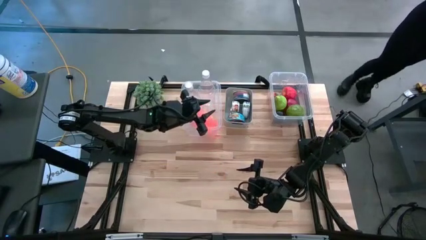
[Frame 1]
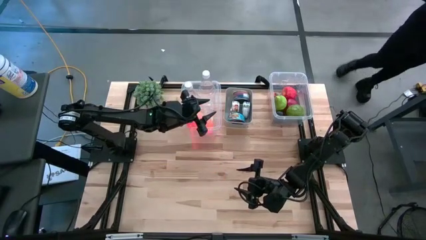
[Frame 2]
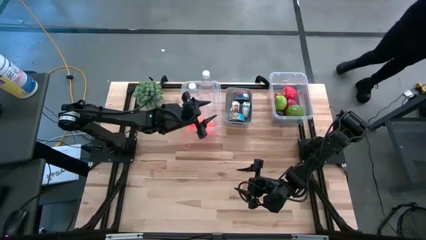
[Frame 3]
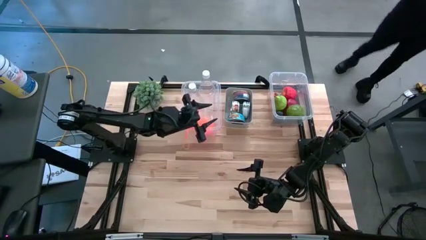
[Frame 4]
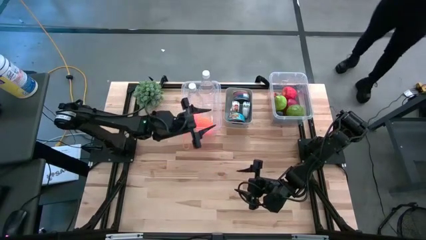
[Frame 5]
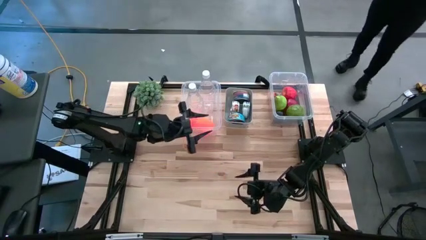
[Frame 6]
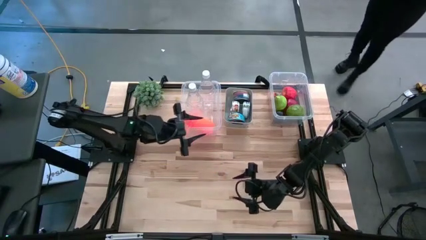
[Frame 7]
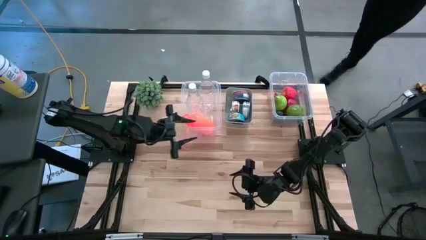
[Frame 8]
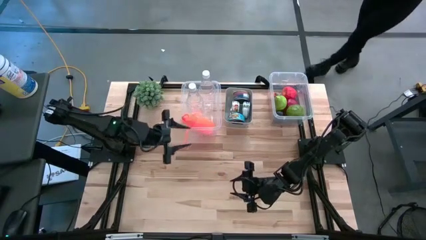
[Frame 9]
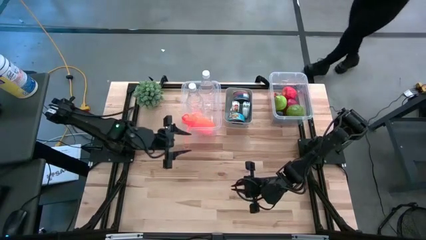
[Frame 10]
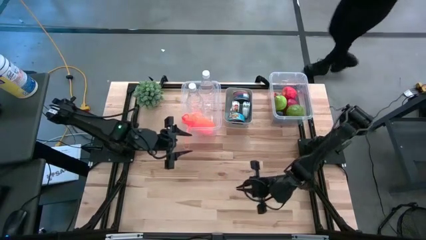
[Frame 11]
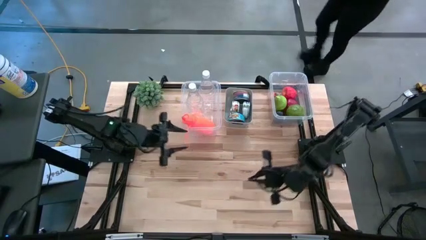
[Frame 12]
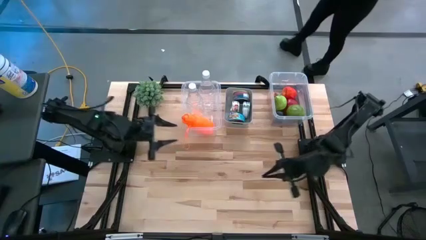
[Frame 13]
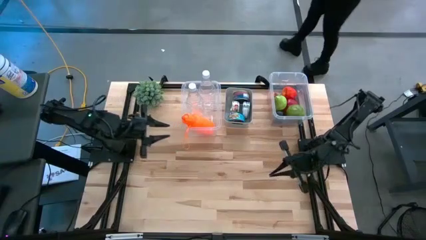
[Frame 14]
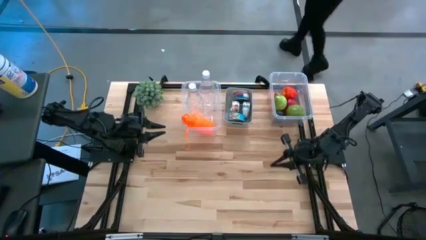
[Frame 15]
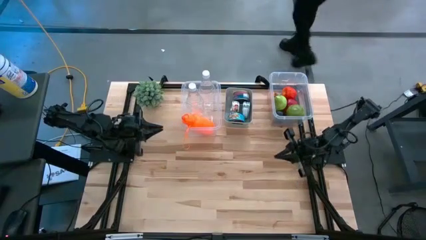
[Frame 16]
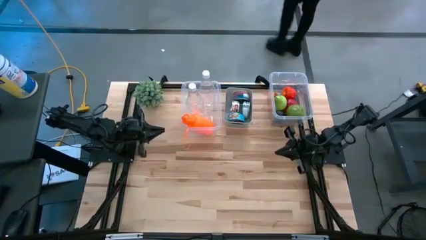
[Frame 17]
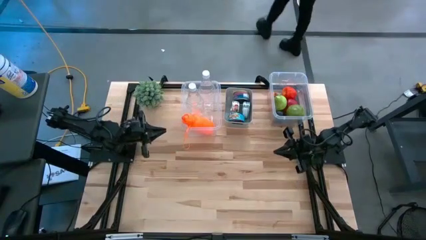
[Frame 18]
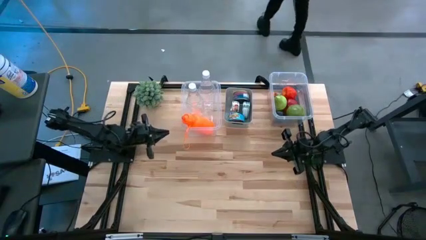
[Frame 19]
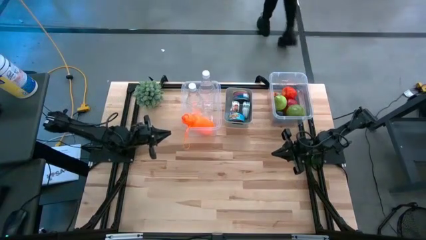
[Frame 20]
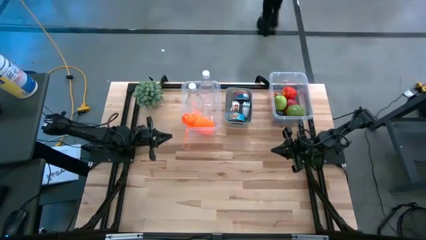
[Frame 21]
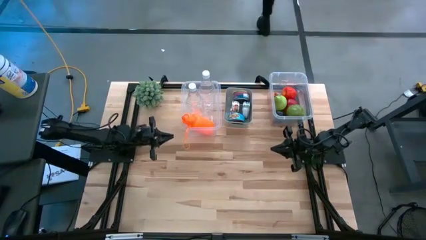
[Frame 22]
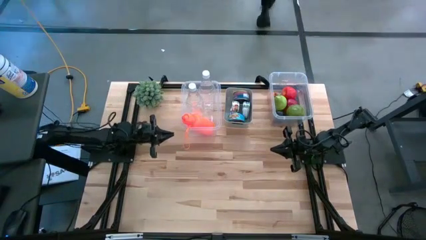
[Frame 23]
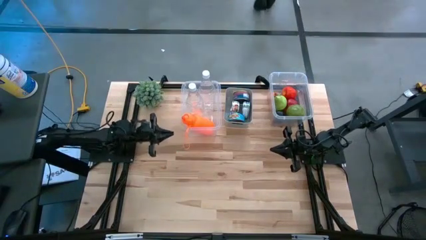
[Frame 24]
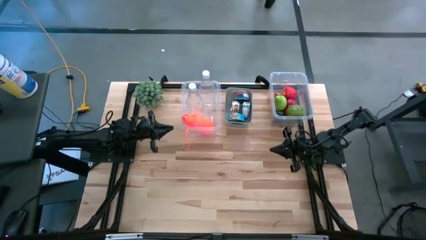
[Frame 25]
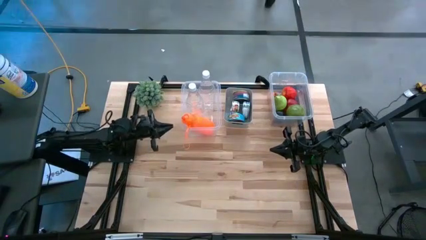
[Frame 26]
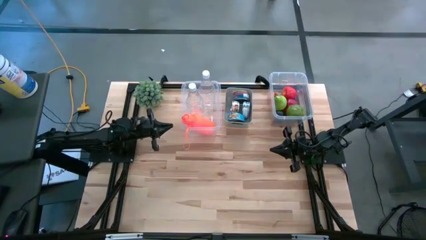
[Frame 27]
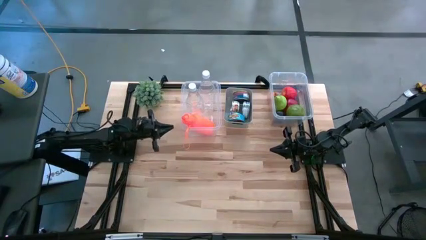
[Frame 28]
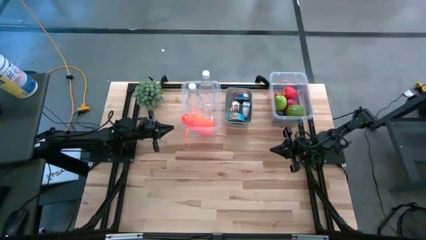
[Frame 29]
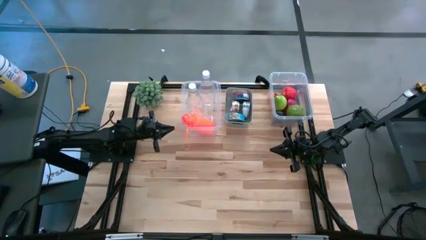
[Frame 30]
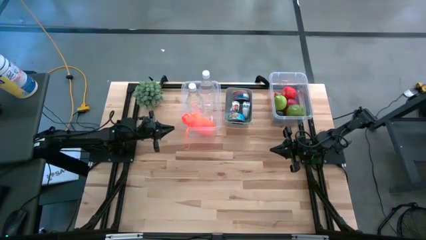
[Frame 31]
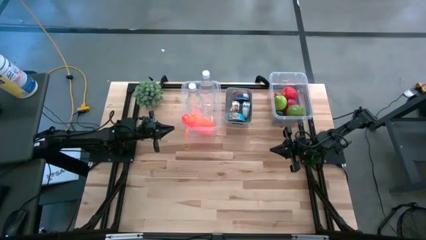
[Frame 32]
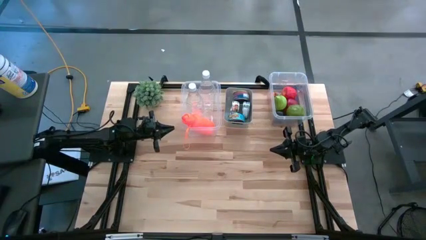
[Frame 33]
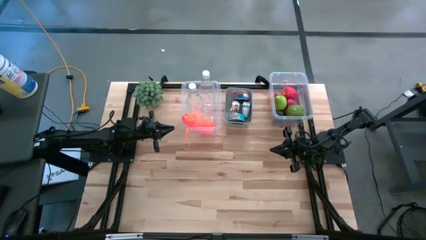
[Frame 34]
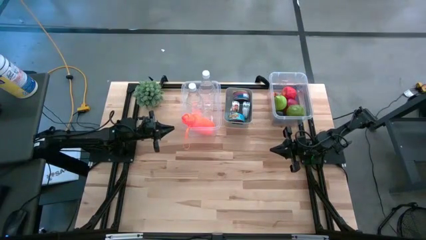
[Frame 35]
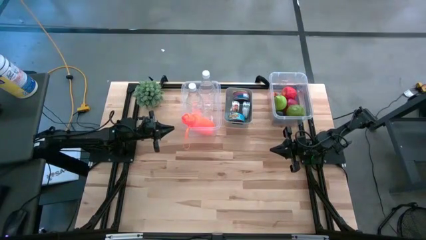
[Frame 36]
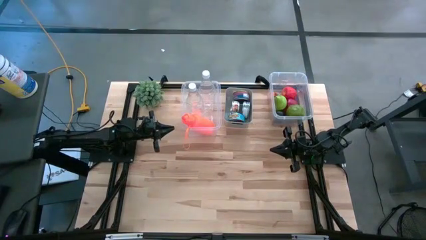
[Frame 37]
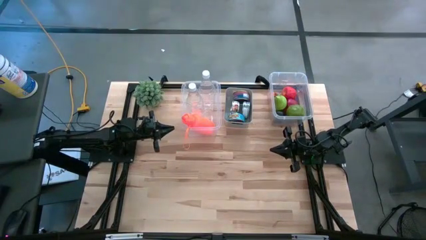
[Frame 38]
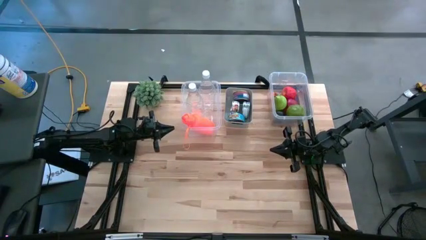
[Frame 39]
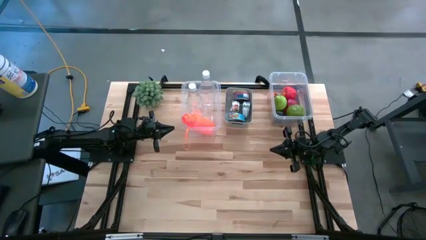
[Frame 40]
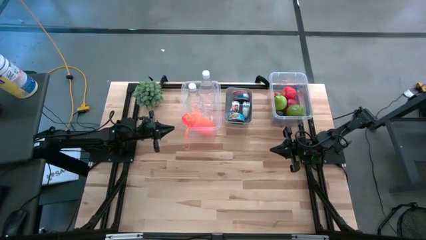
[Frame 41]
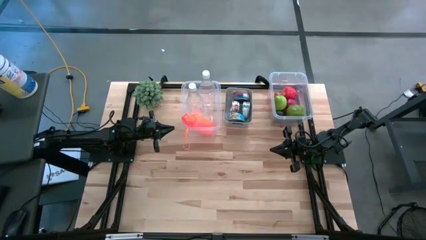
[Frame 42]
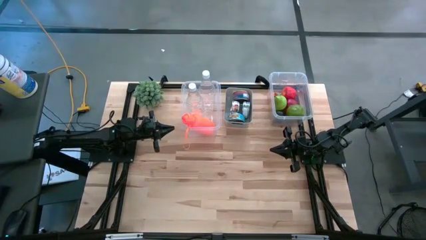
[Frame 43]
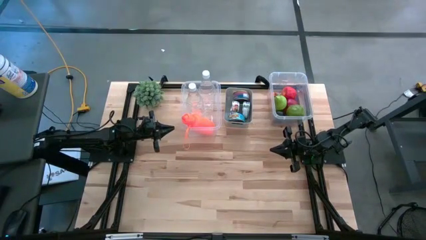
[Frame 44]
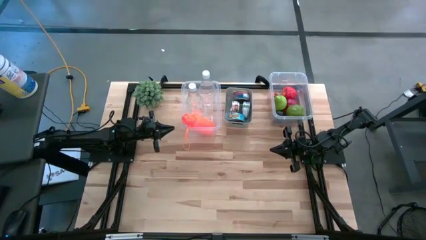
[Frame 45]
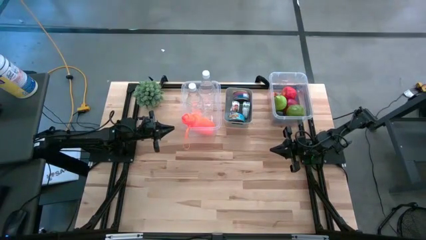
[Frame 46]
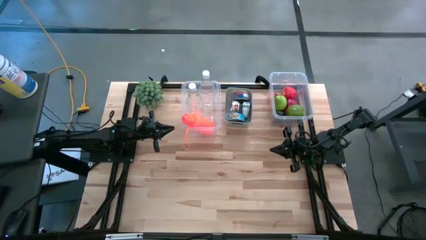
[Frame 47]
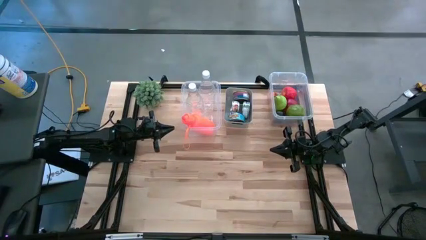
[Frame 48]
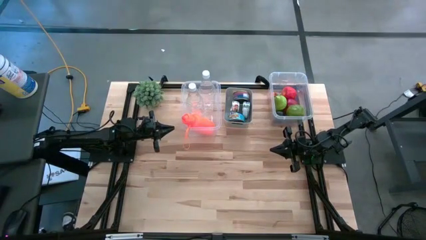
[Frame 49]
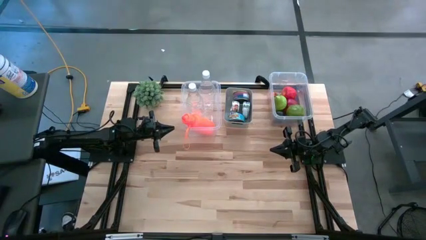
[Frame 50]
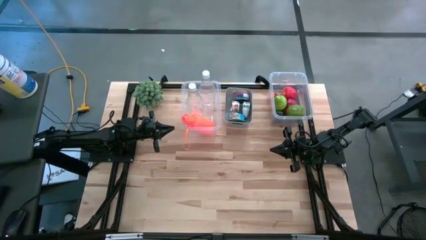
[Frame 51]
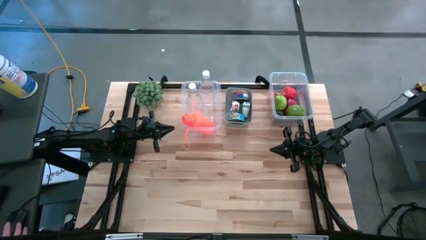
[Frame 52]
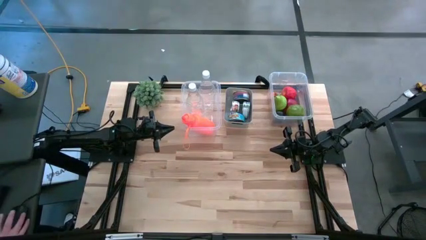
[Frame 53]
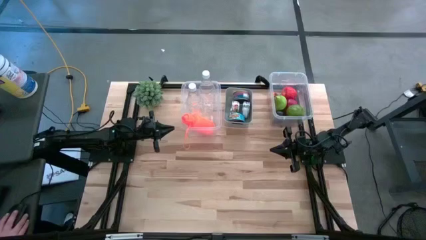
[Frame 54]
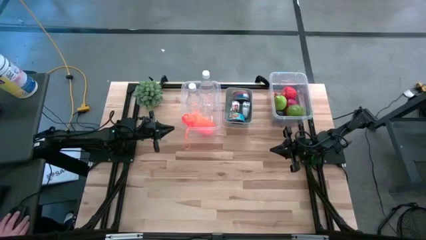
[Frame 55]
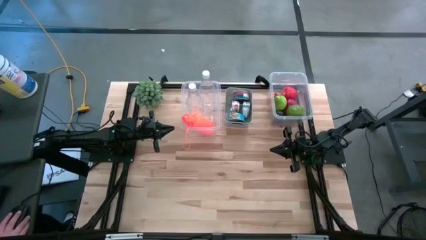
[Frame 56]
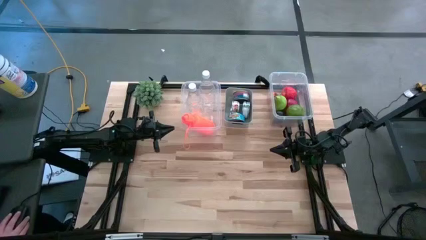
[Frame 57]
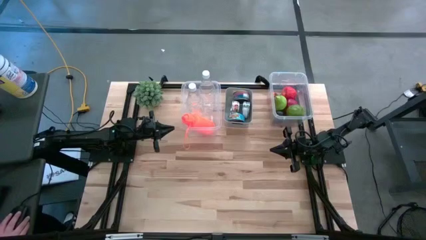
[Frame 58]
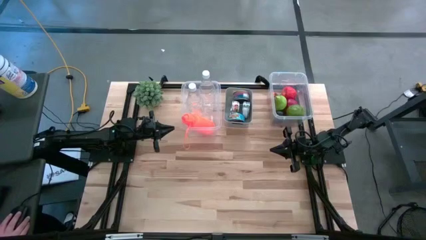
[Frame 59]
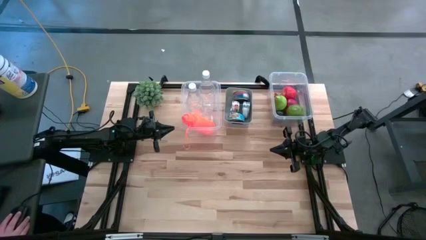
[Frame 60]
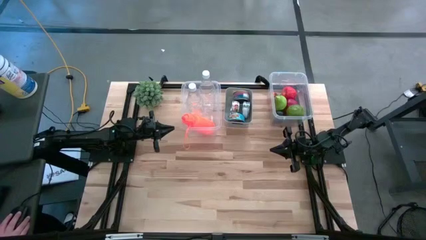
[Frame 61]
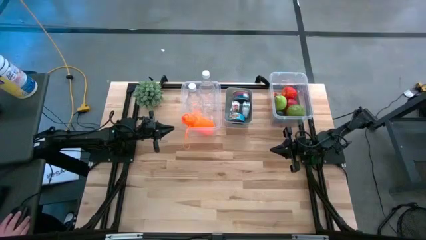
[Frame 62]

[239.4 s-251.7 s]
Task: Pick & Place Food Item
Return to Home Position

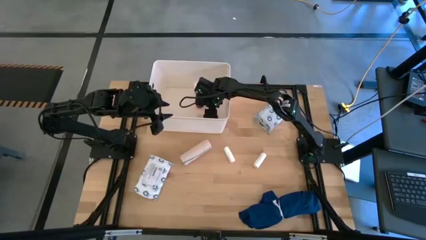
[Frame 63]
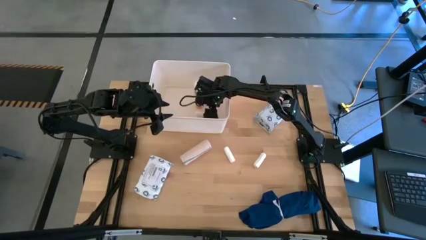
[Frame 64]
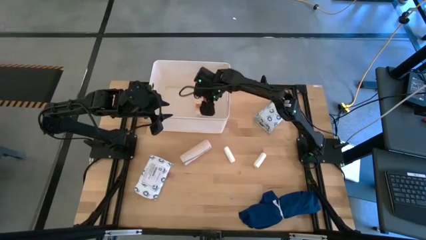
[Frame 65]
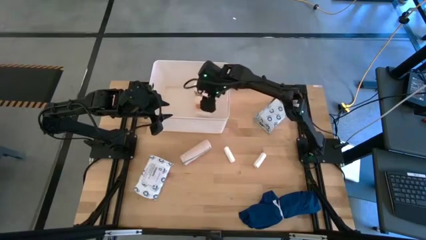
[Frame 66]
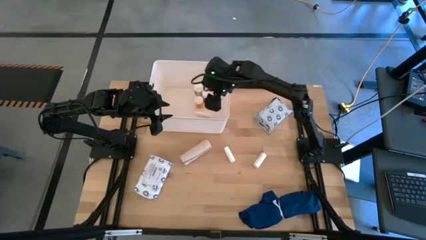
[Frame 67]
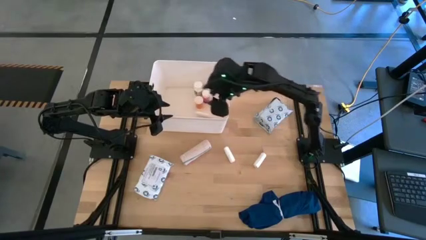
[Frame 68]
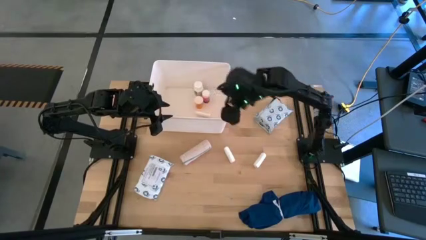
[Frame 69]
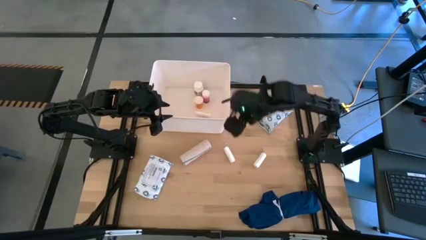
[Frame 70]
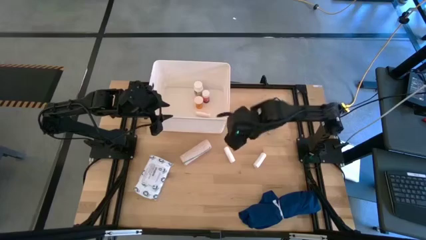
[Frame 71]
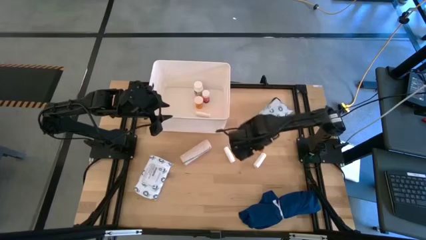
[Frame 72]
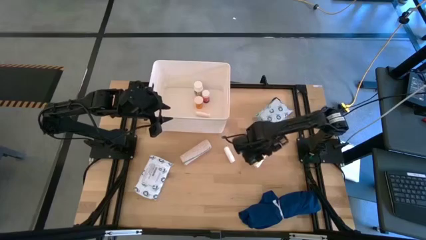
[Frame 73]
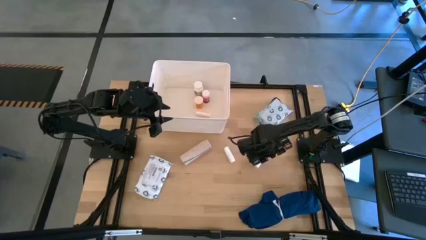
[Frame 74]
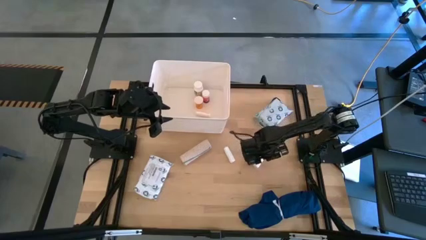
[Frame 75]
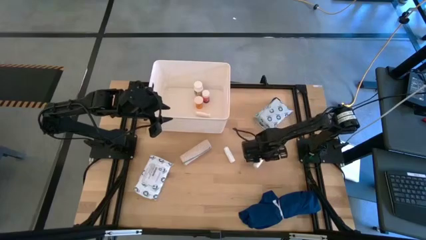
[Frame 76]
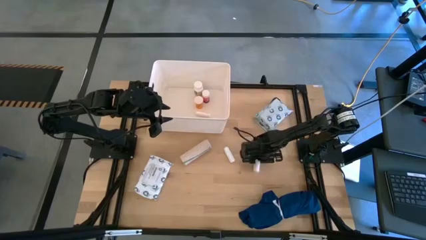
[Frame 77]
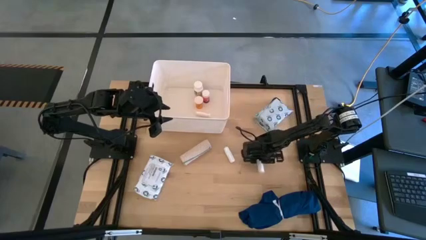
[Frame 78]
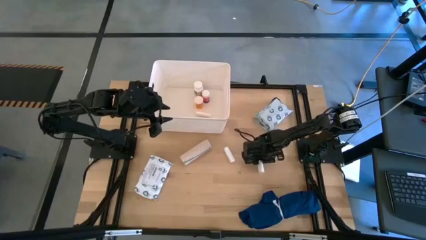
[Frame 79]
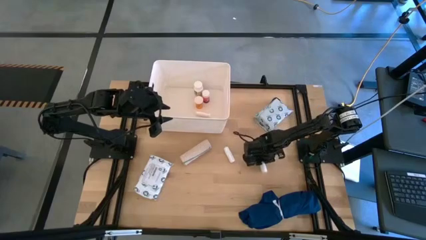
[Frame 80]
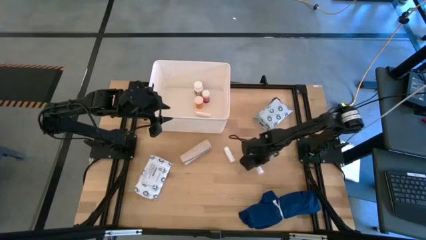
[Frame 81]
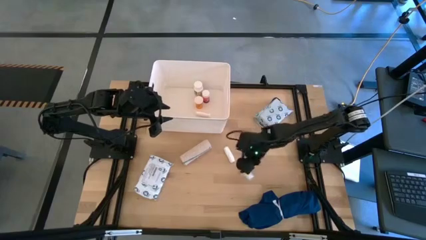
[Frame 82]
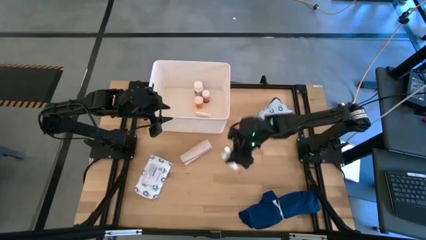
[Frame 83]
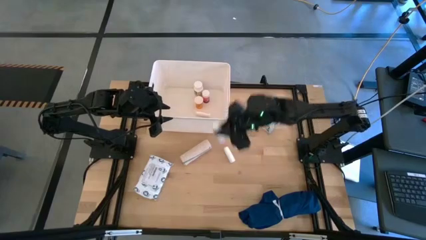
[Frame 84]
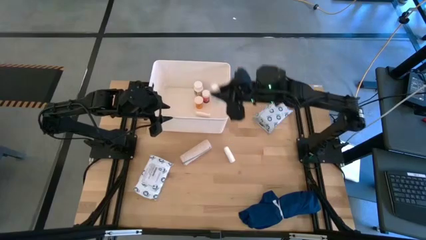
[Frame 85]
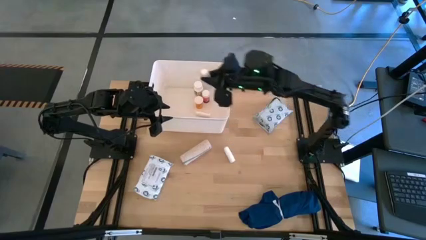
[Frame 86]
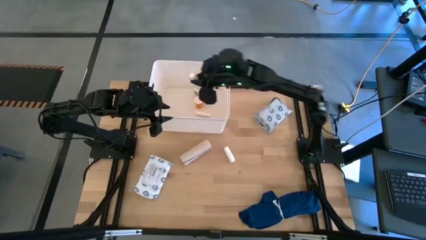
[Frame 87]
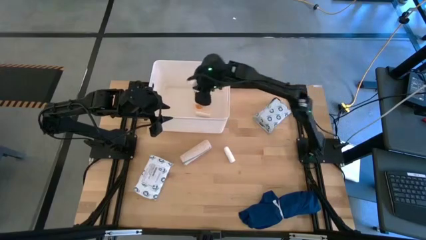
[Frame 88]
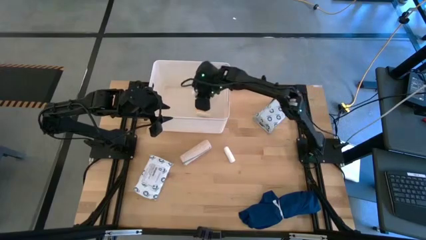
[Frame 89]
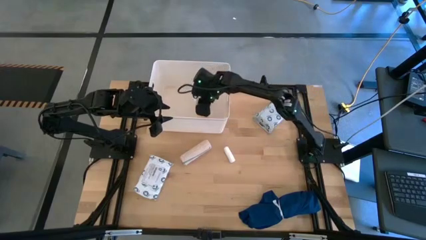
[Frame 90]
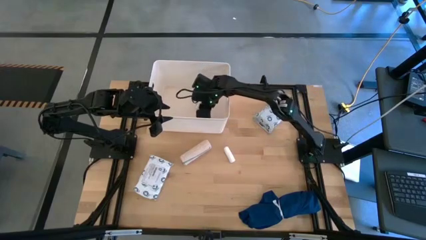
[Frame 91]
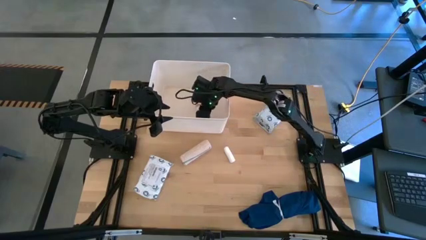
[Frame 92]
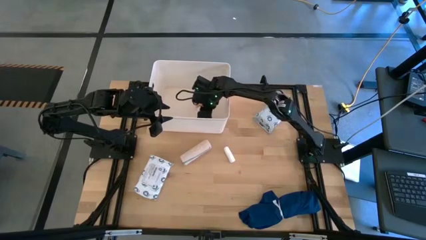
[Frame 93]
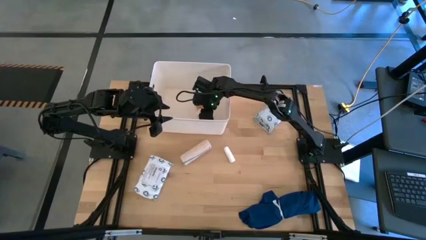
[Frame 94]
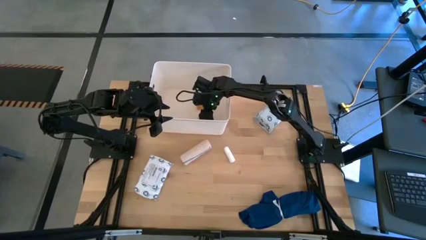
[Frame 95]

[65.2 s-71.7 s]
Task: Pick & place medical supplies in basket/bin
Put the right rolled gauze into the white bin
